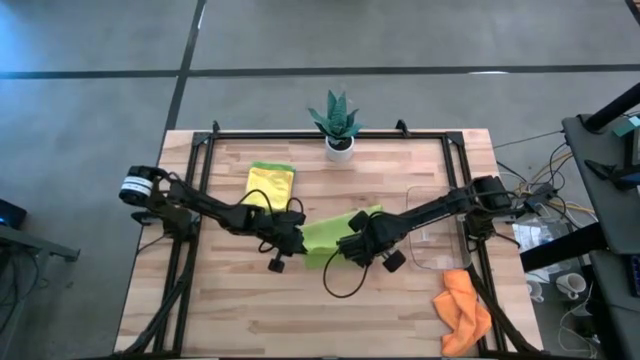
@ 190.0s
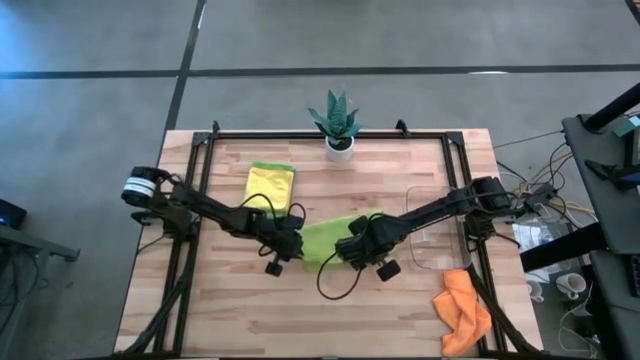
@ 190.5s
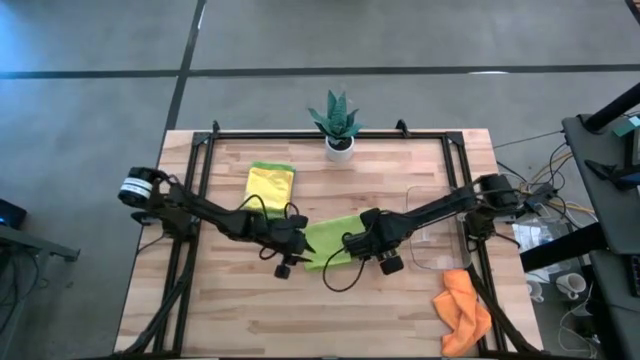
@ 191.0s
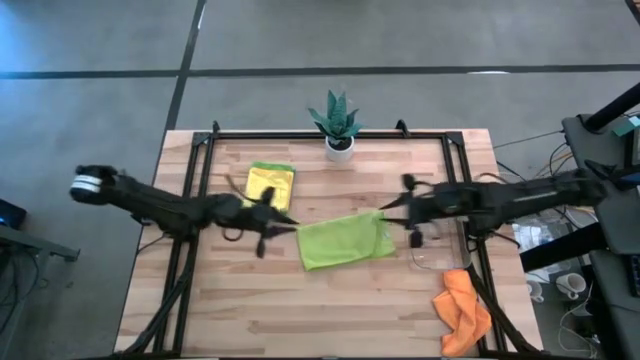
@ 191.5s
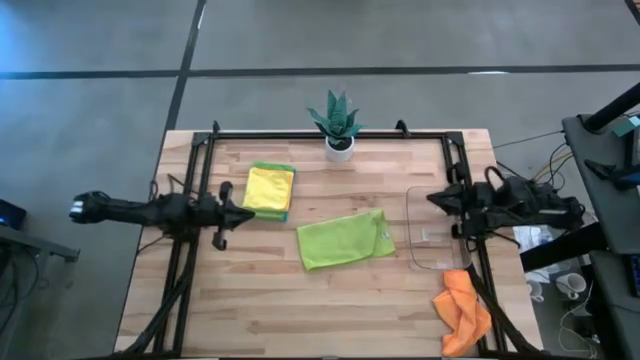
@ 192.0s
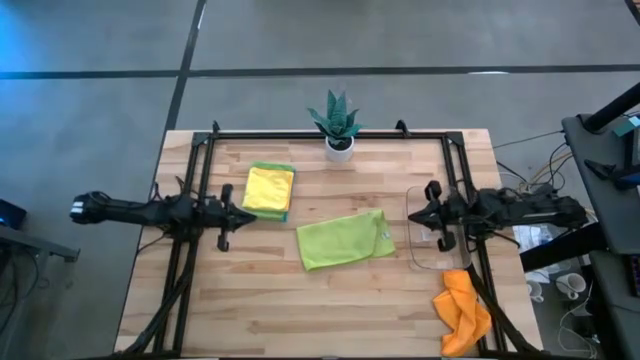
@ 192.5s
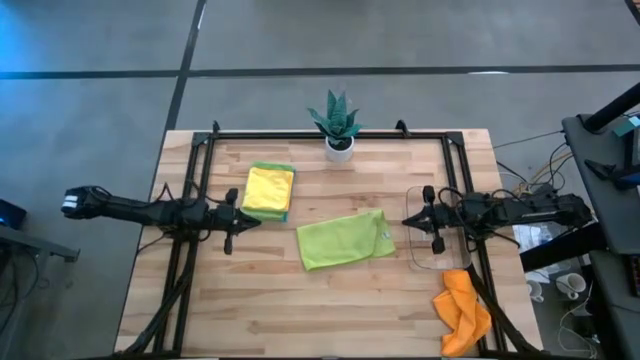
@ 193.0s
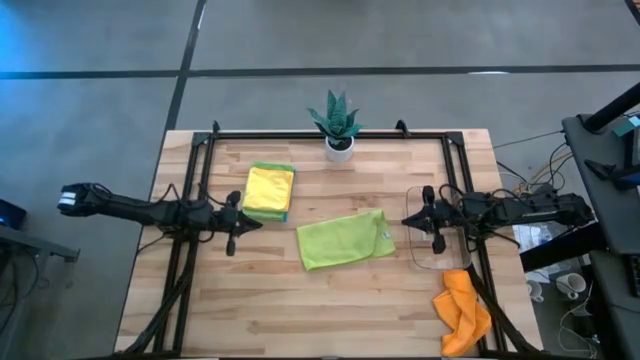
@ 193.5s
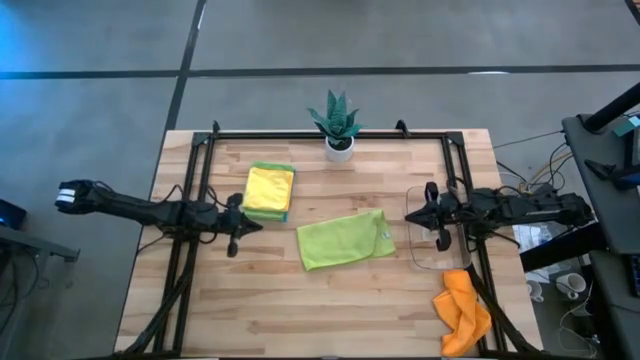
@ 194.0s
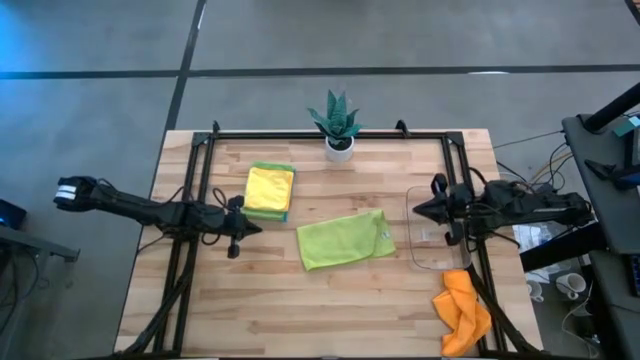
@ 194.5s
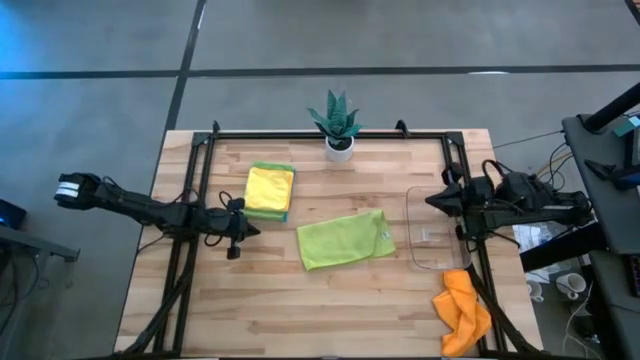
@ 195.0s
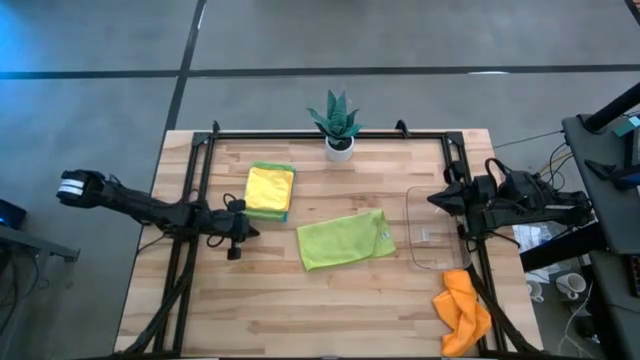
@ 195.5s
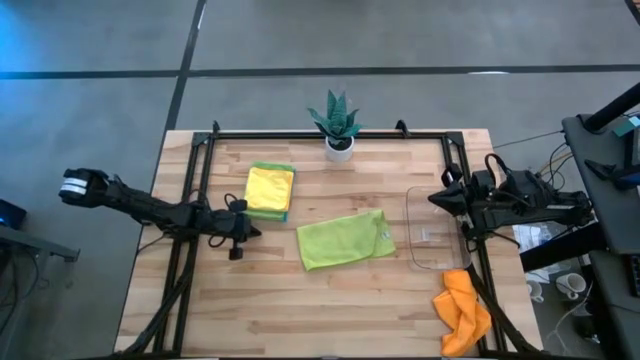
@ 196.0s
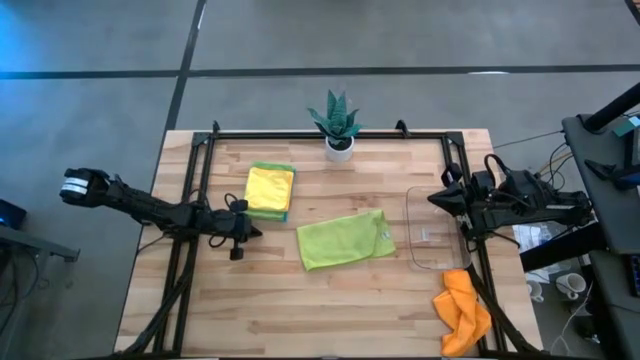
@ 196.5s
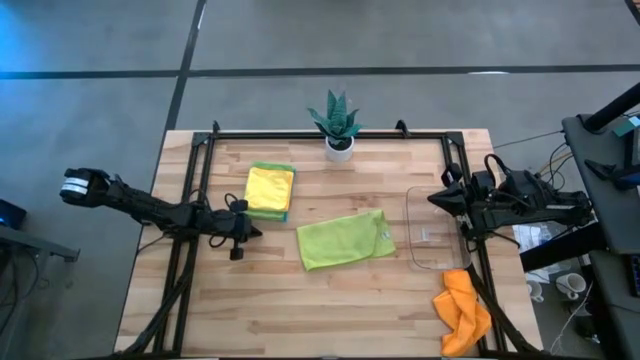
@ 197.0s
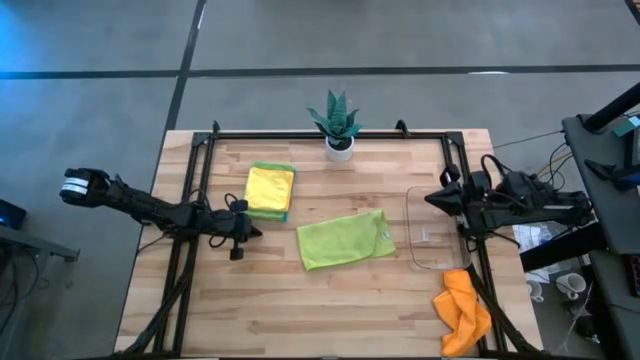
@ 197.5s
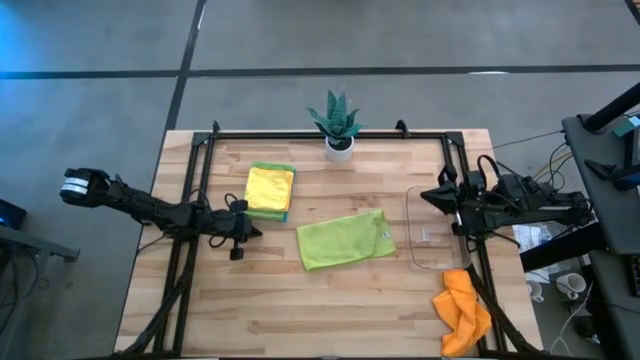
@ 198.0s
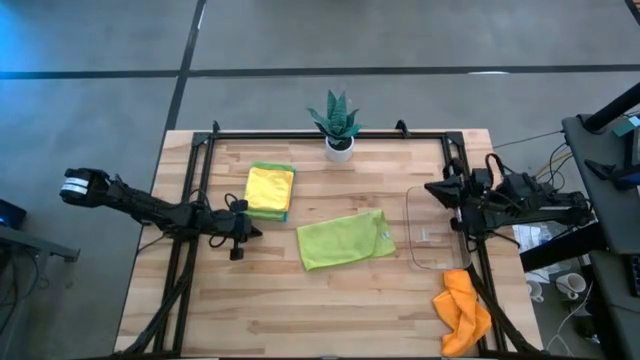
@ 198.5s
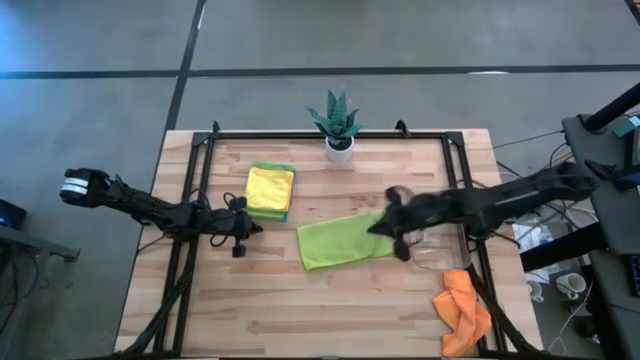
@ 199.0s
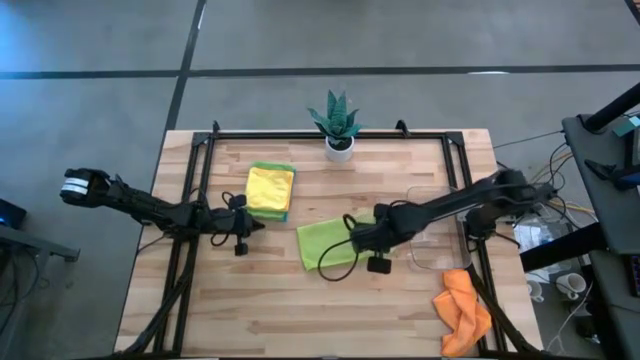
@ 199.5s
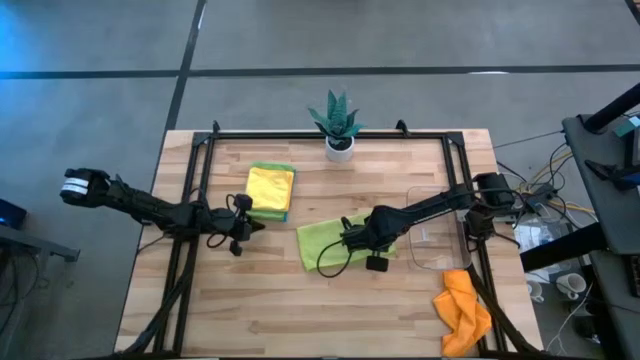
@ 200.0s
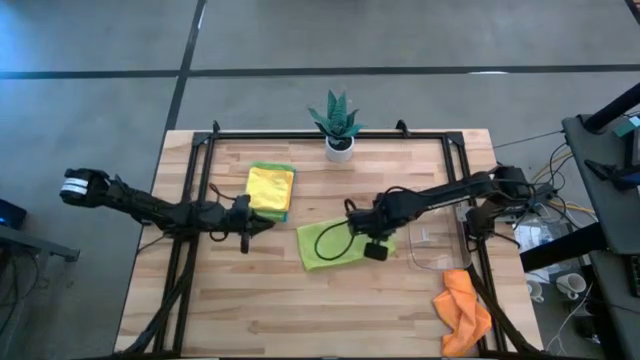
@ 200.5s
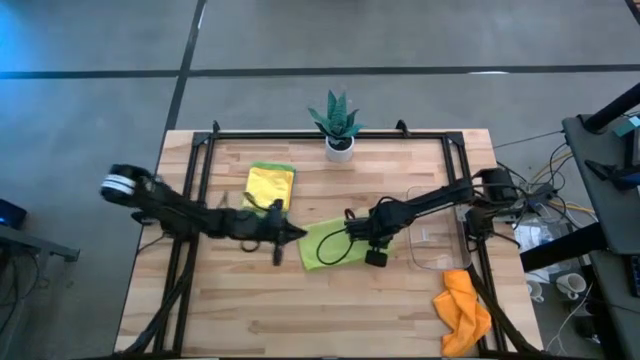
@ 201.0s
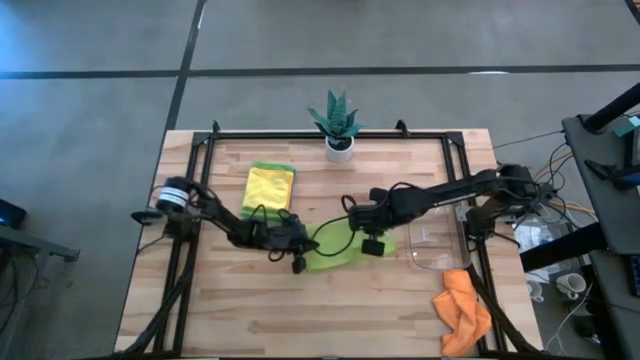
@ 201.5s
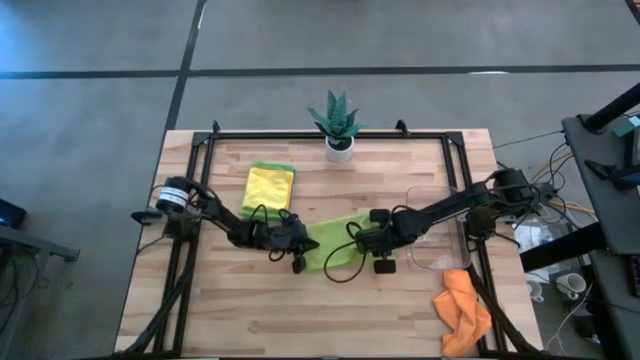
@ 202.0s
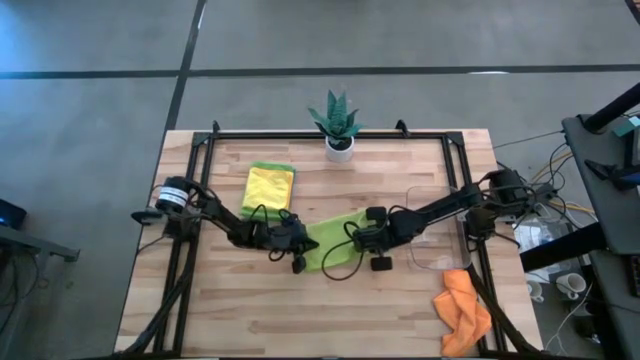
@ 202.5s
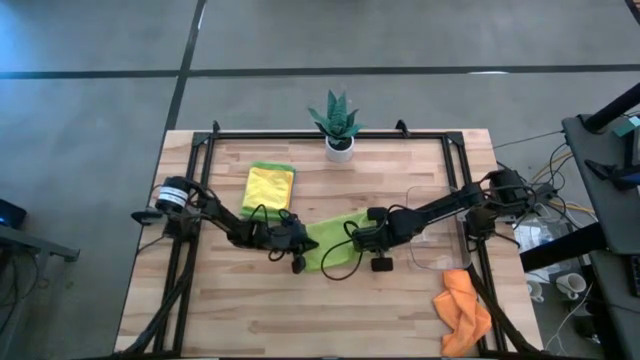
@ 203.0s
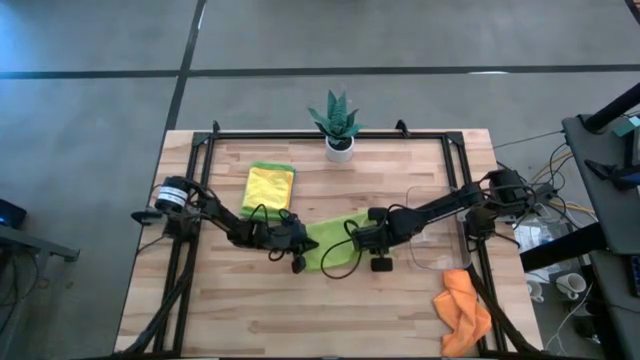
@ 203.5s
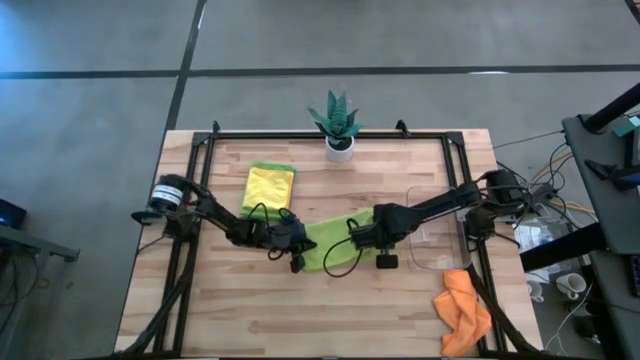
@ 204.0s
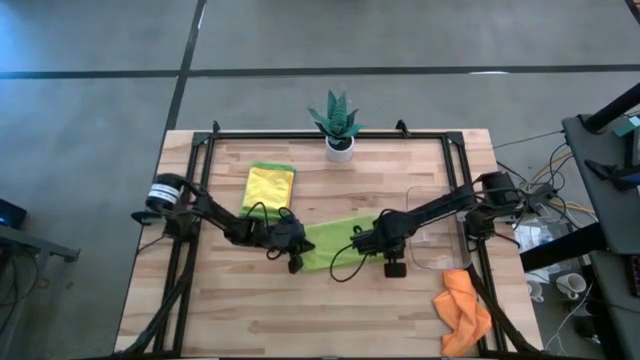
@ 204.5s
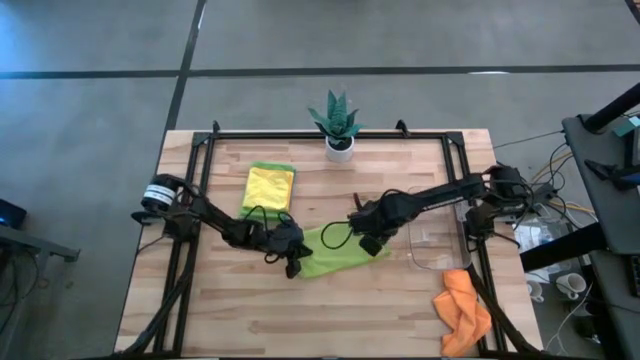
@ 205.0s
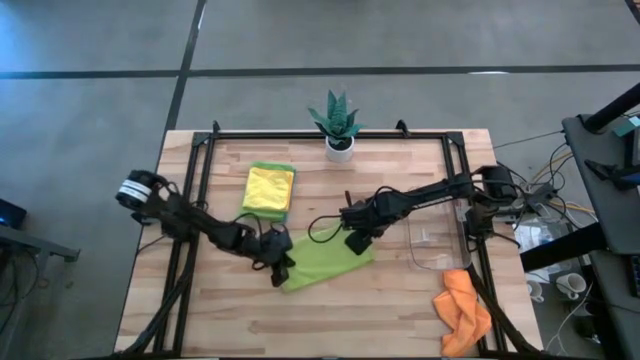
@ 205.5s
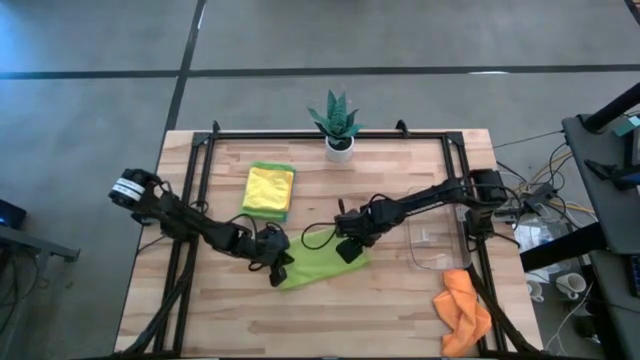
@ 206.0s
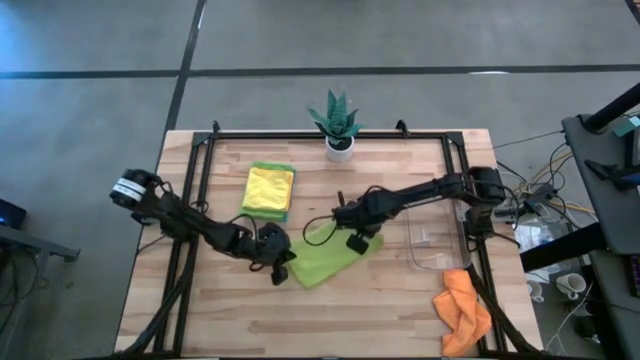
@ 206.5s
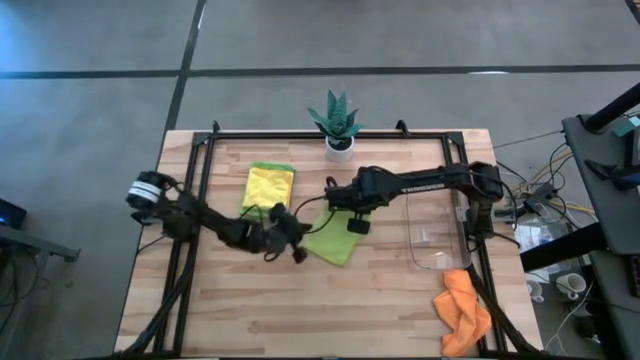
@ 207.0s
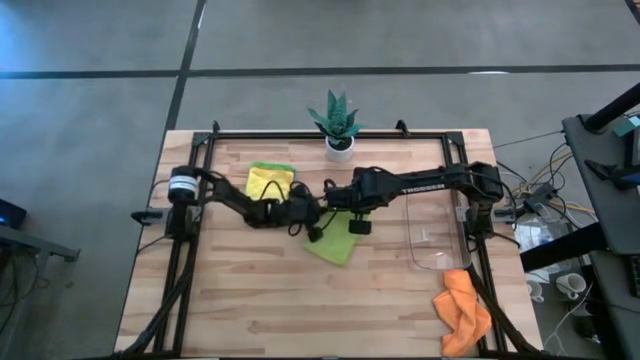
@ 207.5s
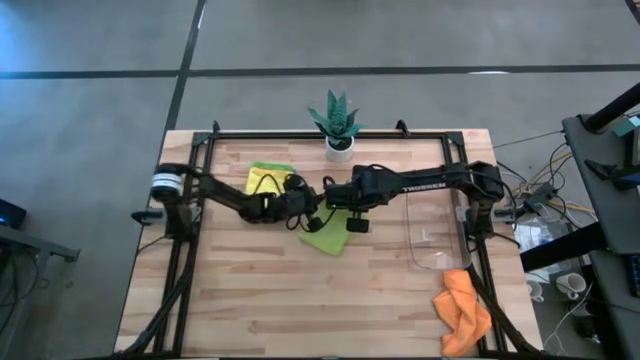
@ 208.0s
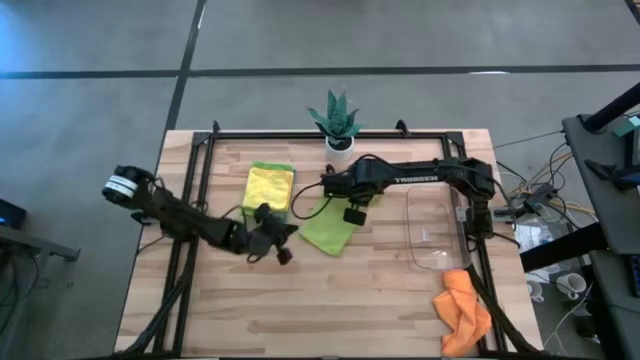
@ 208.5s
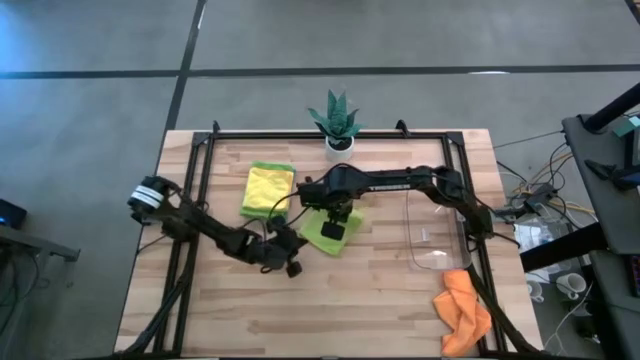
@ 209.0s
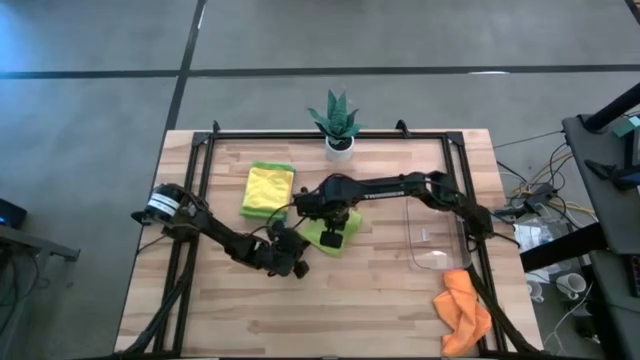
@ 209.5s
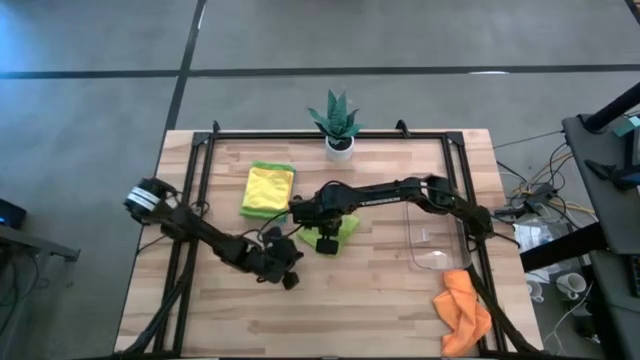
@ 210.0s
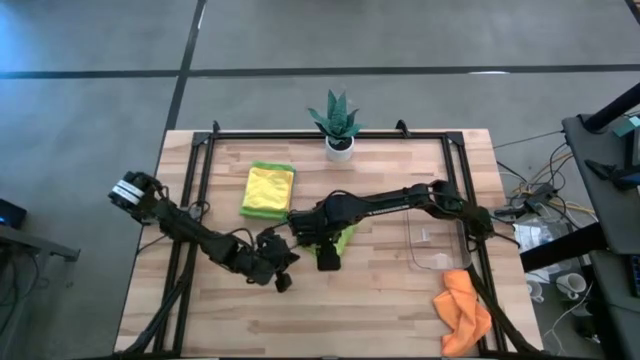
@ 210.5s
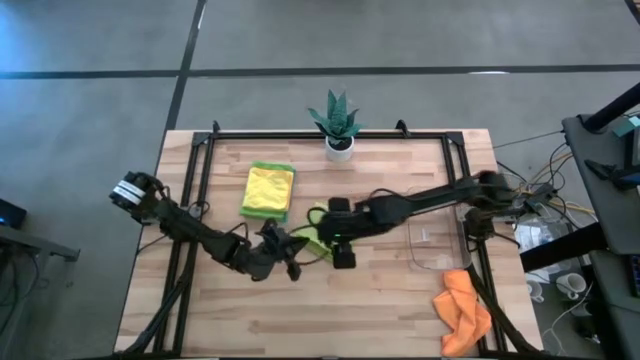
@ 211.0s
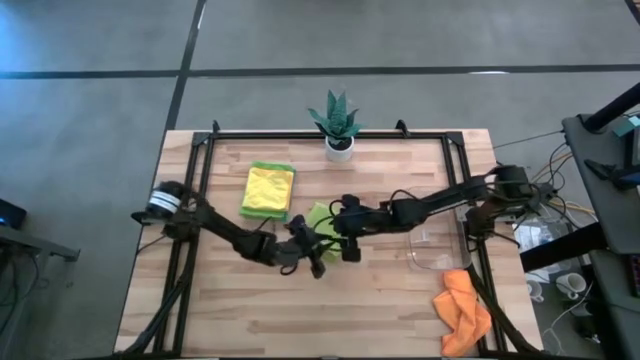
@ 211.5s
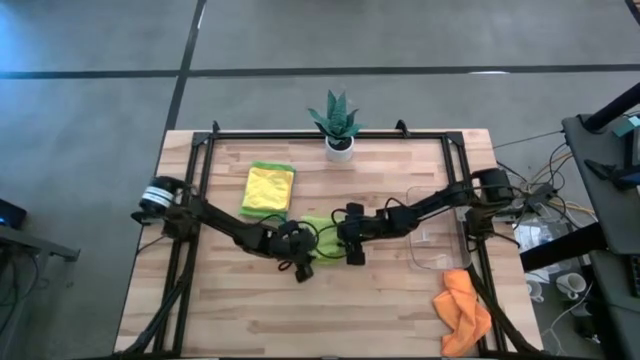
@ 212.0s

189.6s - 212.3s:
Task: Fold microfiber towels
Fold the light green towel on the table
